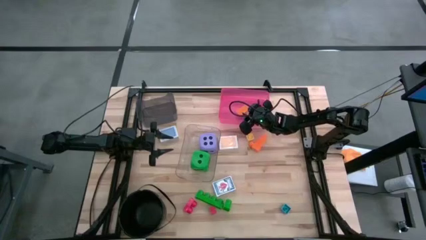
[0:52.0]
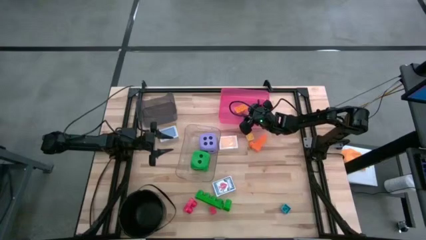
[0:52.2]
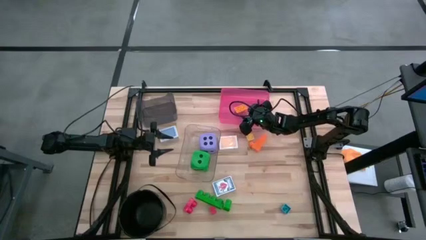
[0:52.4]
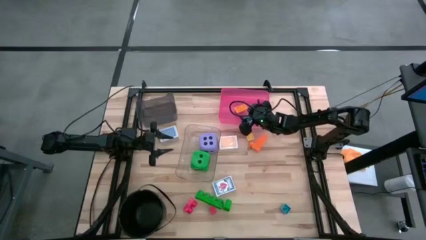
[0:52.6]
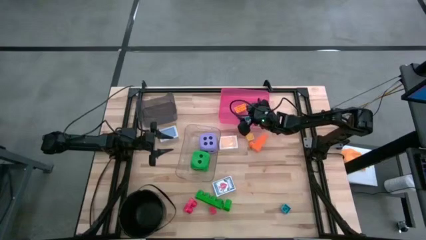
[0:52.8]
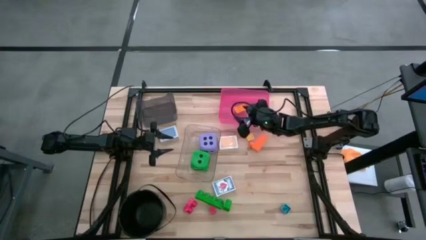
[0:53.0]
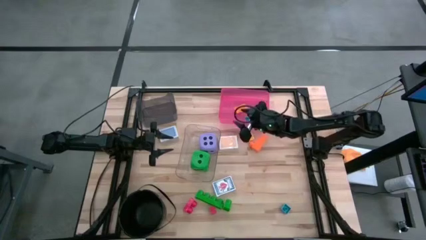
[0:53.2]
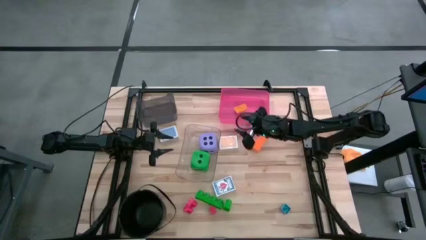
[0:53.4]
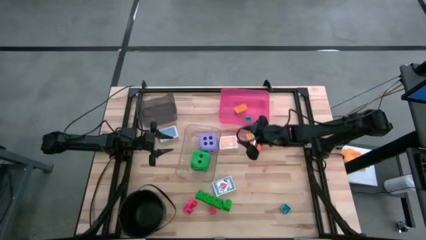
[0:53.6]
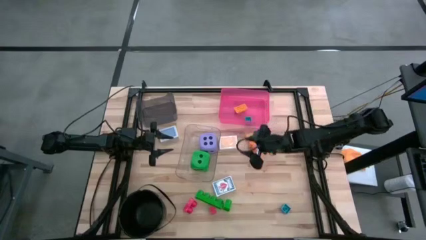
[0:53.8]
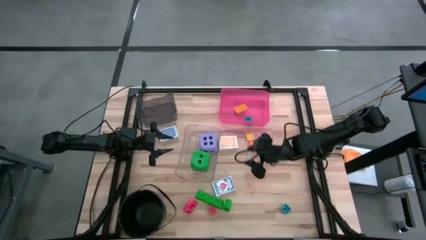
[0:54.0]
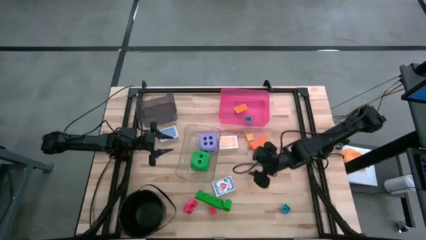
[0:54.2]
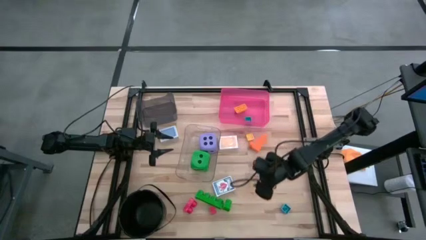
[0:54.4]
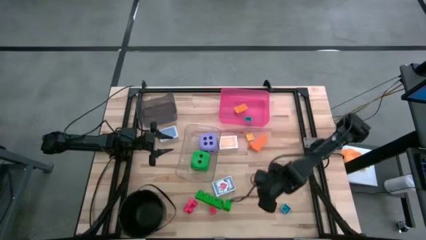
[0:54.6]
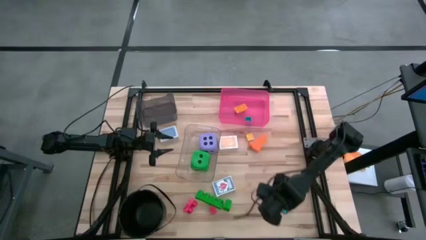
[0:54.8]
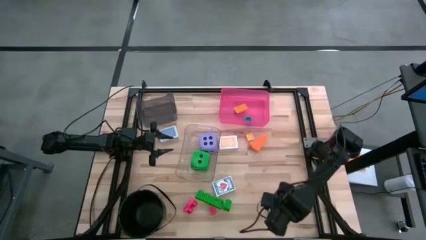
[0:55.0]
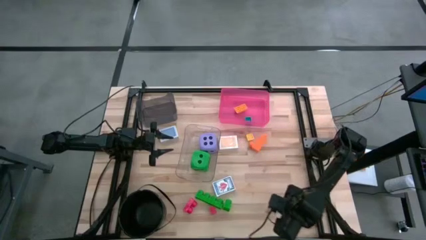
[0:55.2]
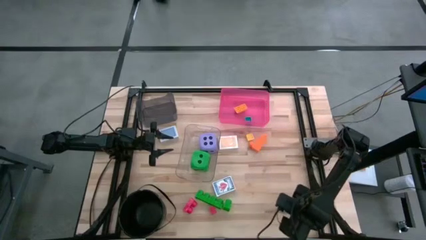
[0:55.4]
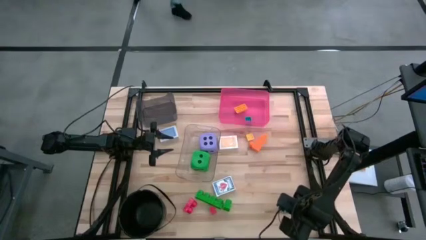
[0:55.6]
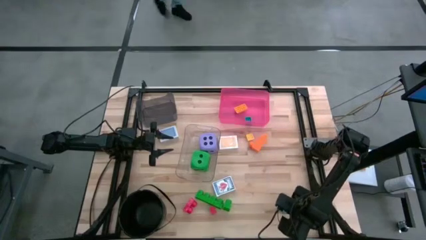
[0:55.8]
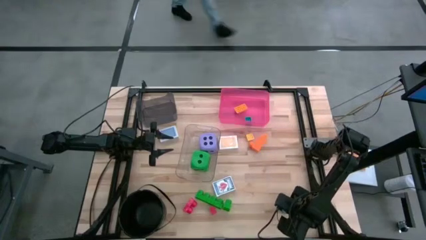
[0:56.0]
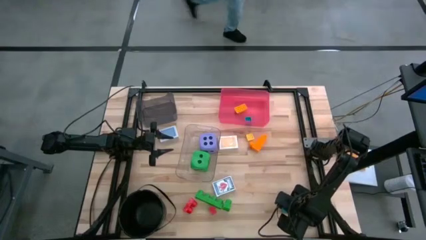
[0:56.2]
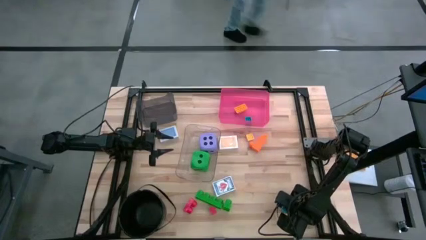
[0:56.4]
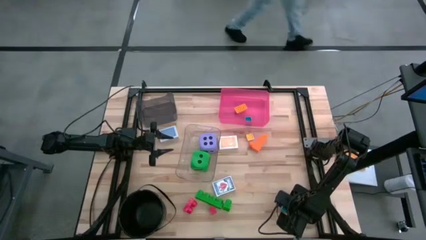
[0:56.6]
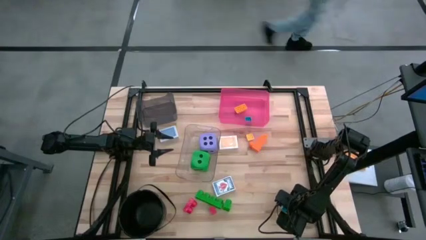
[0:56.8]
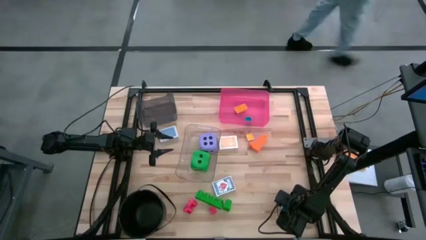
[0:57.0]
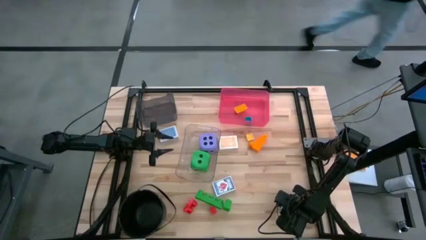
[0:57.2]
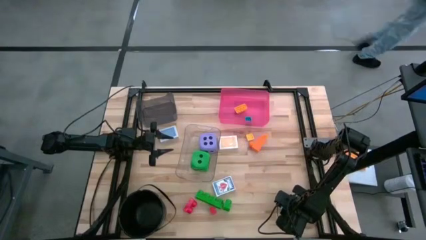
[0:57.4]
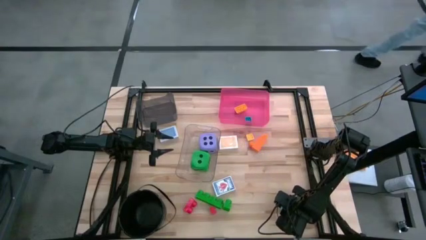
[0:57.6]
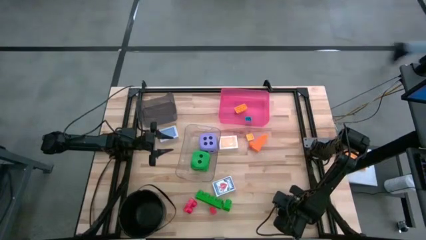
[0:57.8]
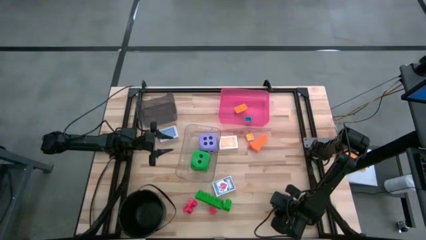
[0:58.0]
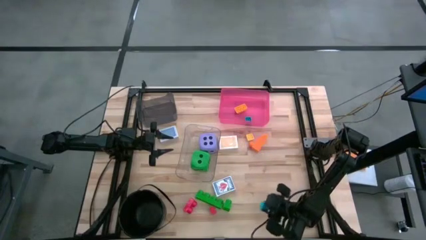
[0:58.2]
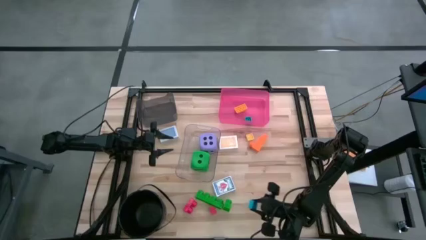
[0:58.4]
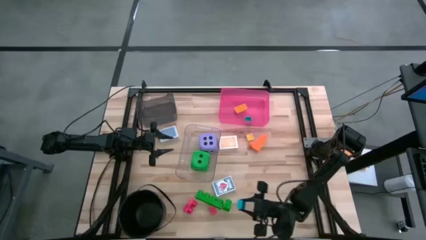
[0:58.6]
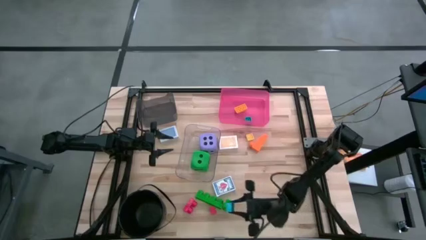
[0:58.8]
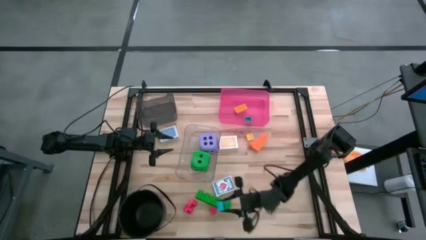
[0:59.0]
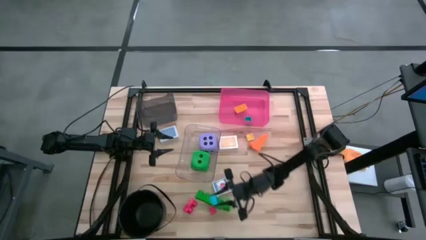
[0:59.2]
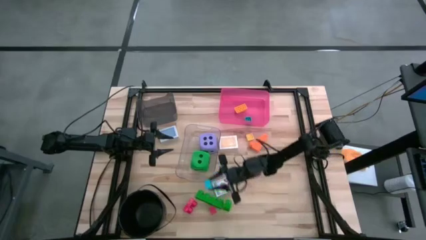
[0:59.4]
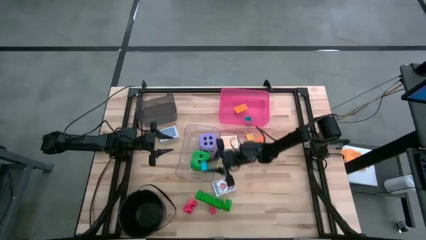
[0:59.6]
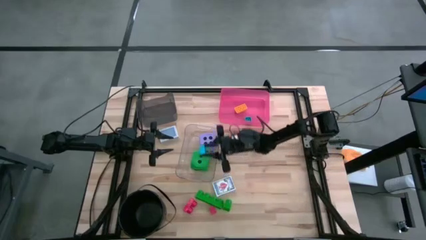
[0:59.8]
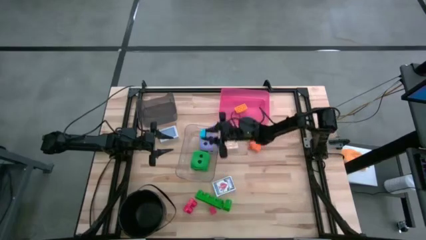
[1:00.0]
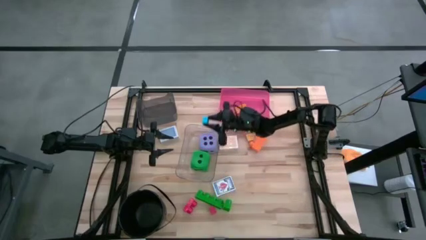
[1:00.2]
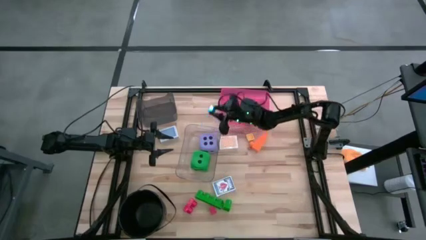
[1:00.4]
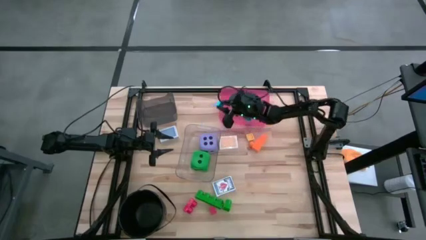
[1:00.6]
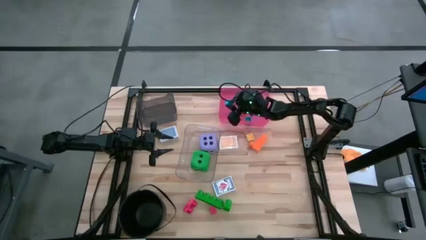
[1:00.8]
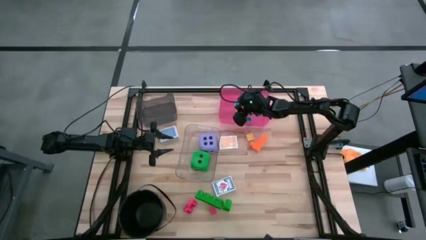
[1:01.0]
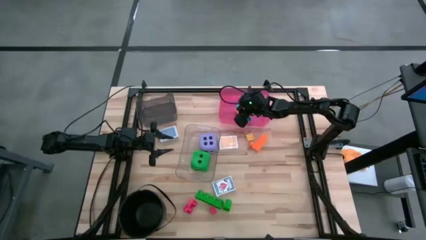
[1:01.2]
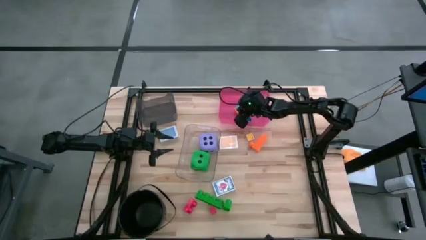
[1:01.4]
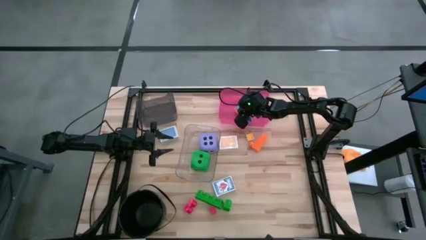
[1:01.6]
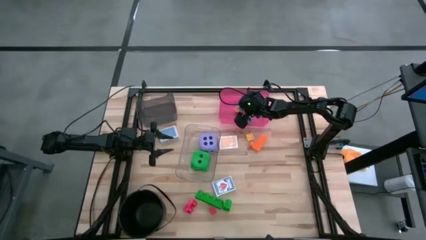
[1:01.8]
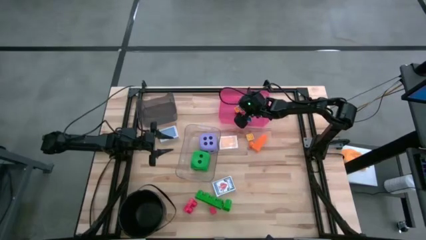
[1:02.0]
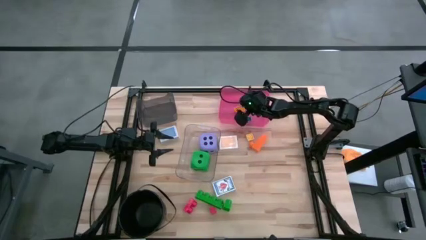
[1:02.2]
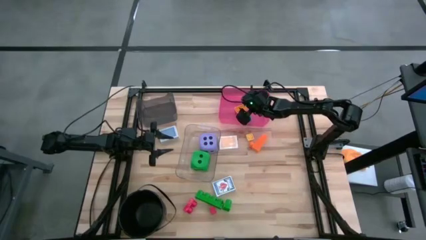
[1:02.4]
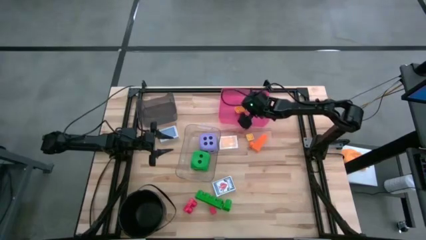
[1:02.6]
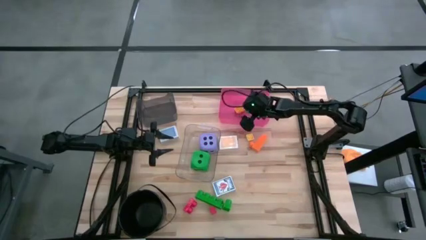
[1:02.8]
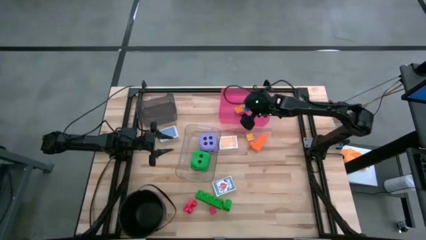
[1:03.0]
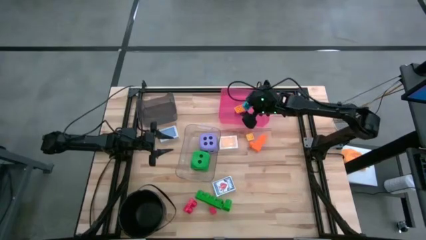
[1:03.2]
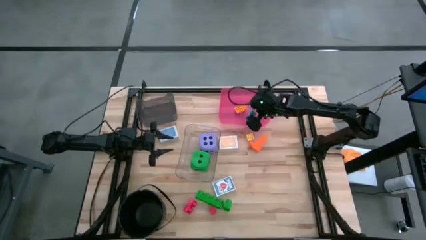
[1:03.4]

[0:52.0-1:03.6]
Task: Pick & Place Toys
Put the blue game piece into the pink bin

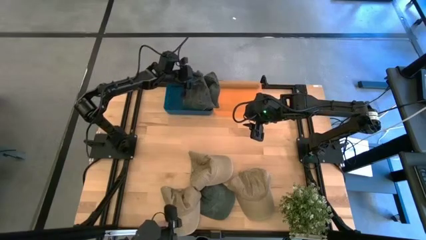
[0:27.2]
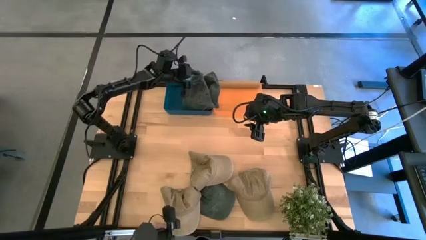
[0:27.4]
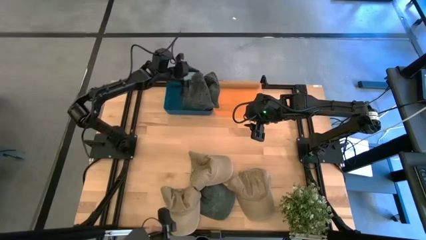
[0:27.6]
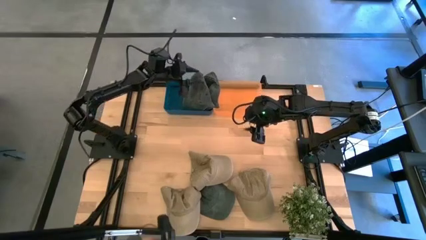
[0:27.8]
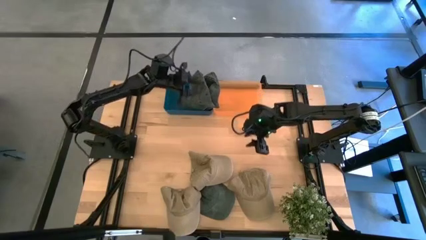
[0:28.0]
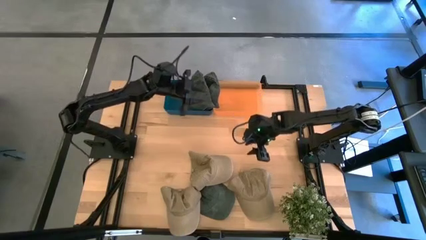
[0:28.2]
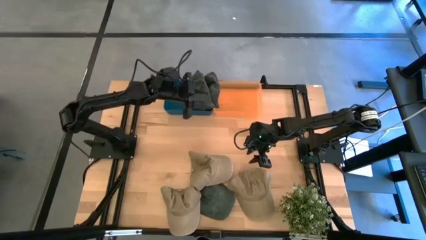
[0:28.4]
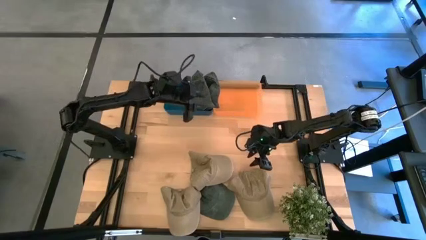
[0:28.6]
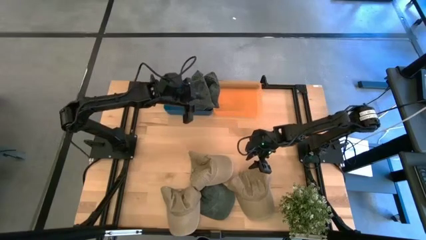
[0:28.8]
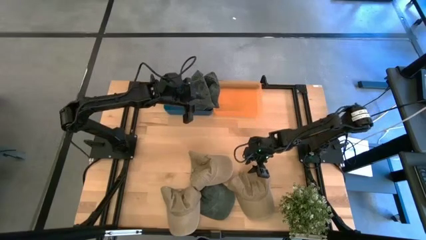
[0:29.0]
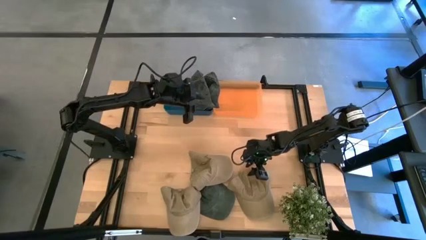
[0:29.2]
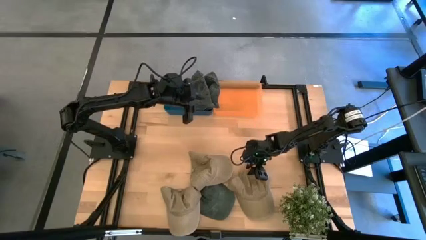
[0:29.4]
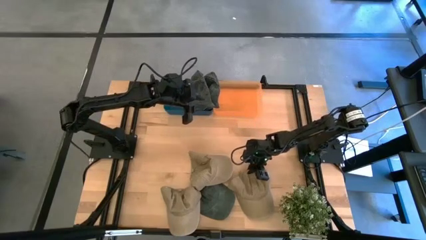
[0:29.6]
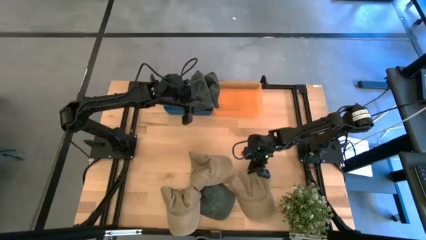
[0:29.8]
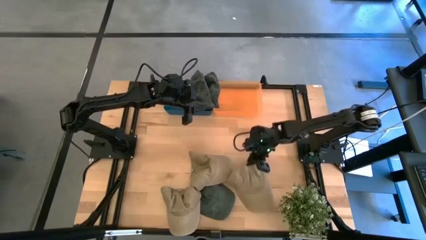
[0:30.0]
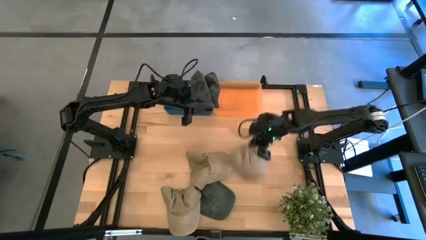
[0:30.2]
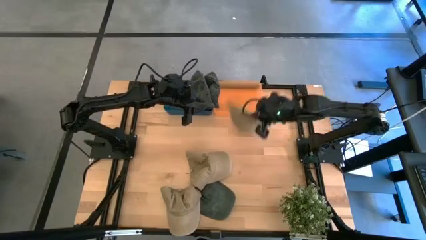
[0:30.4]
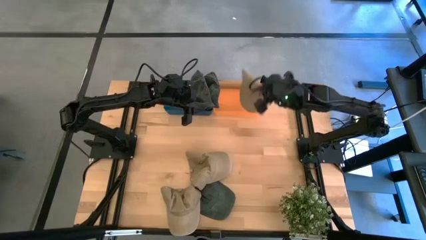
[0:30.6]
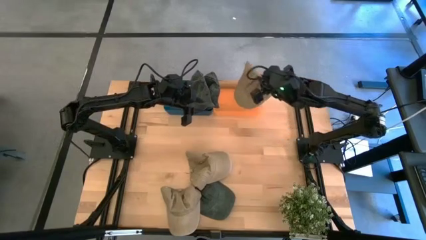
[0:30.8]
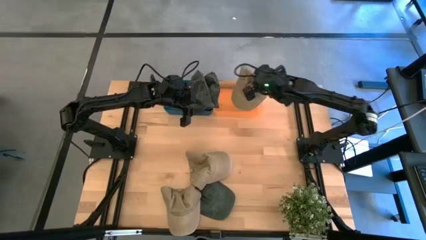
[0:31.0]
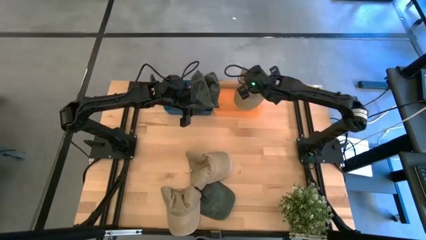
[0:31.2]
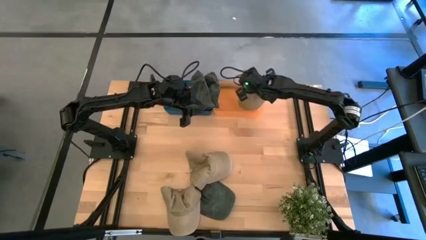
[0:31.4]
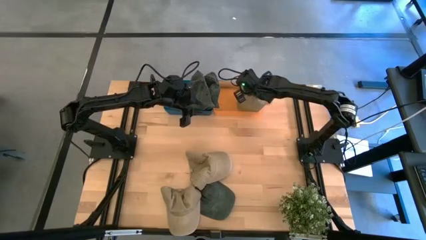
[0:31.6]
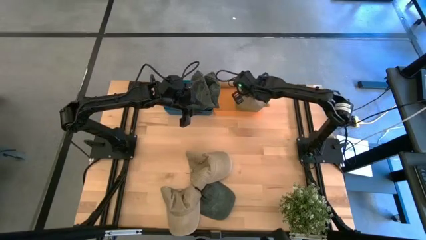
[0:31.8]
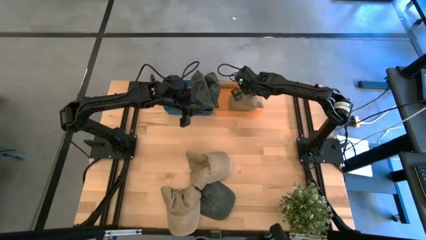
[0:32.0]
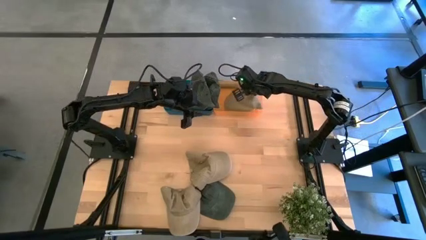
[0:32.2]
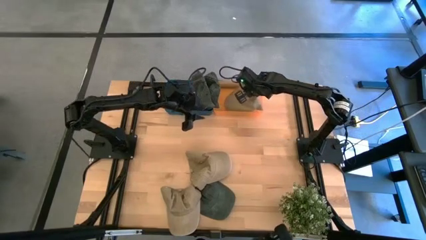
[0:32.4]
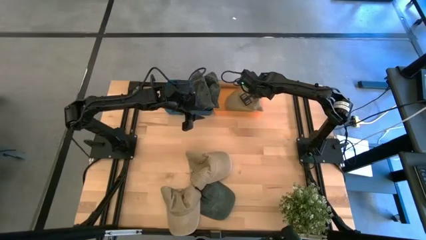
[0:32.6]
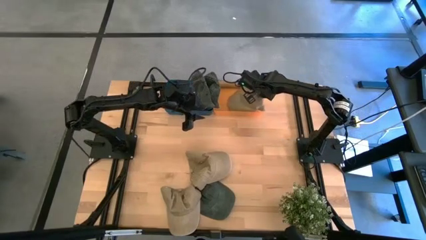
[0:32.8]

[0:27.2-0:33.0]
Task: Pick & Place hat
Put the right brown cap into the orange bin
